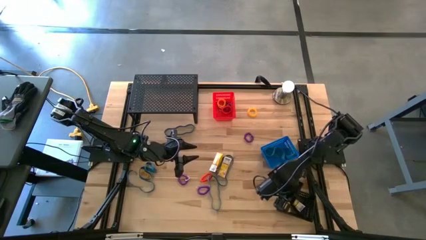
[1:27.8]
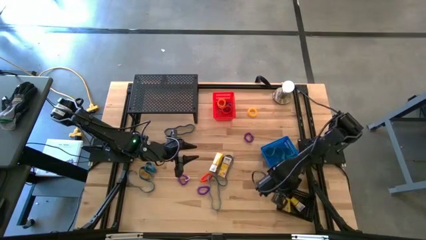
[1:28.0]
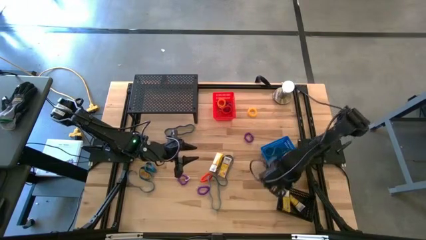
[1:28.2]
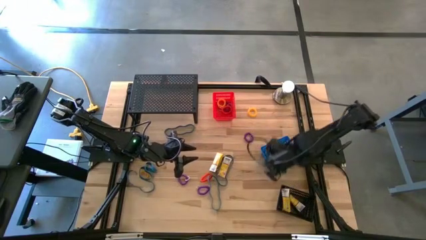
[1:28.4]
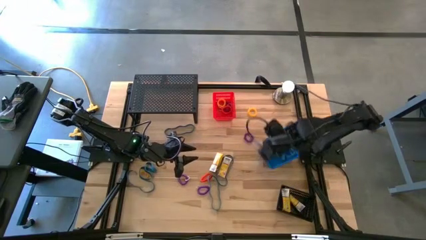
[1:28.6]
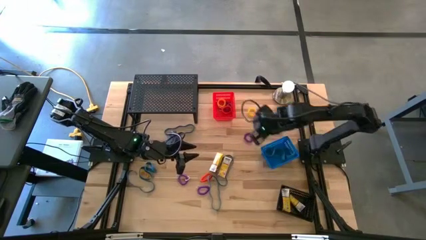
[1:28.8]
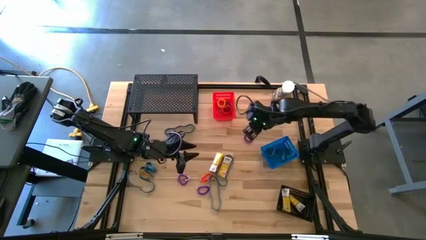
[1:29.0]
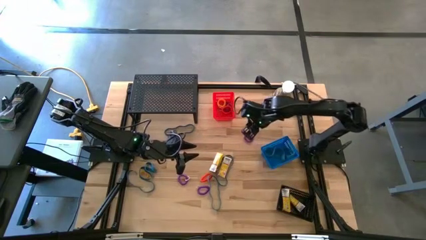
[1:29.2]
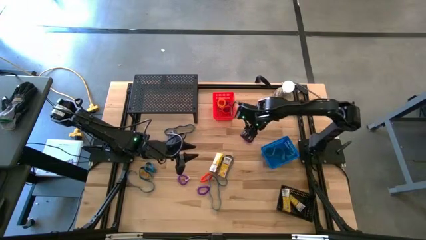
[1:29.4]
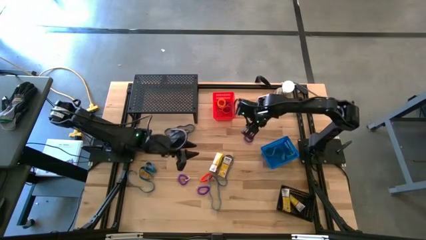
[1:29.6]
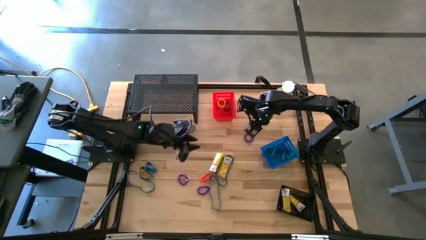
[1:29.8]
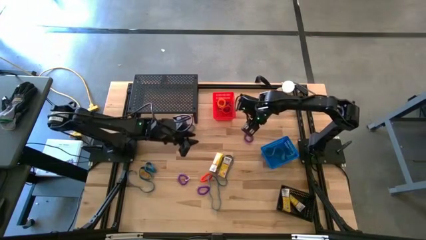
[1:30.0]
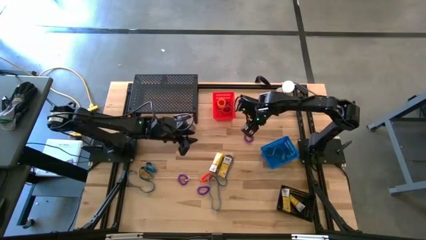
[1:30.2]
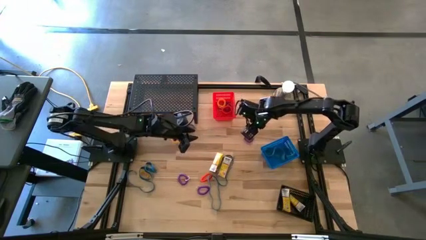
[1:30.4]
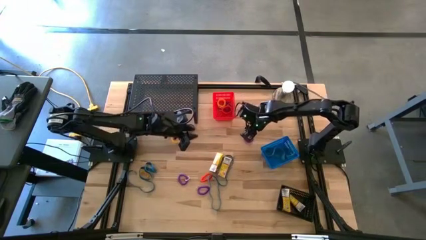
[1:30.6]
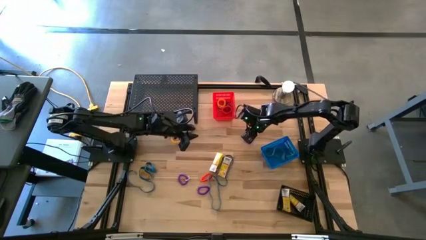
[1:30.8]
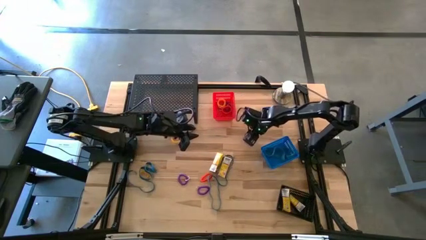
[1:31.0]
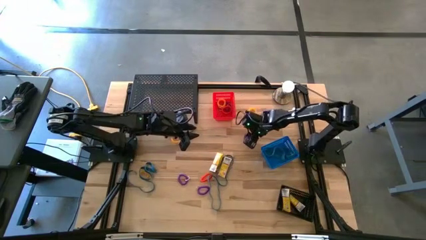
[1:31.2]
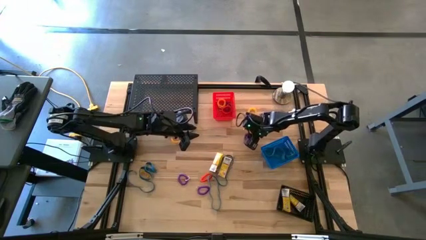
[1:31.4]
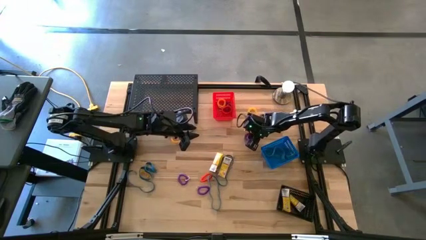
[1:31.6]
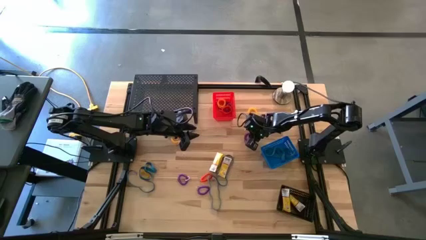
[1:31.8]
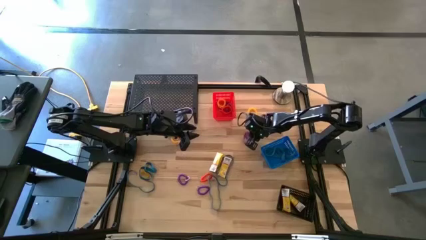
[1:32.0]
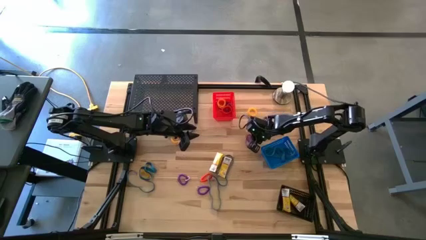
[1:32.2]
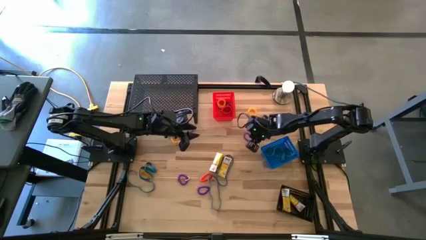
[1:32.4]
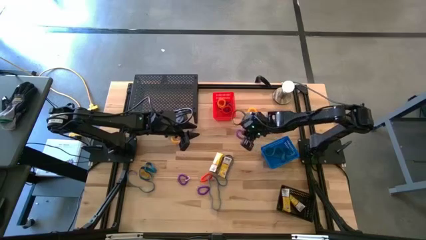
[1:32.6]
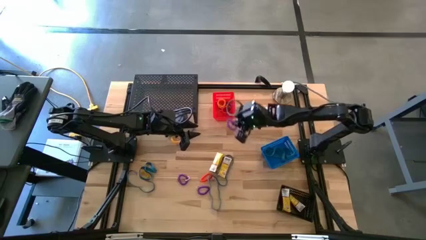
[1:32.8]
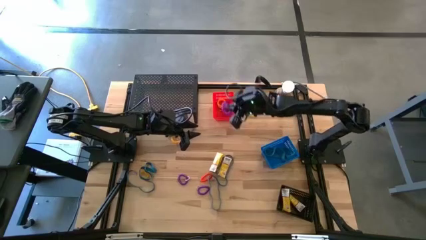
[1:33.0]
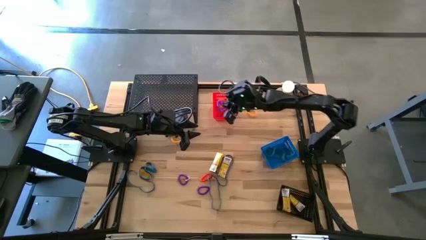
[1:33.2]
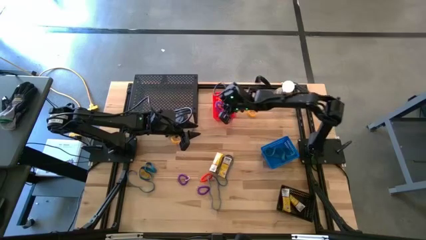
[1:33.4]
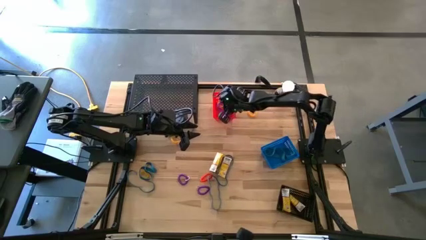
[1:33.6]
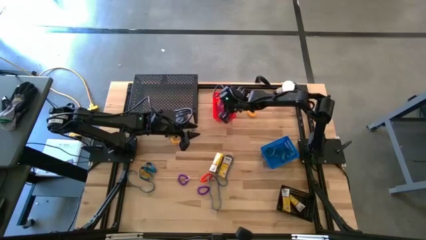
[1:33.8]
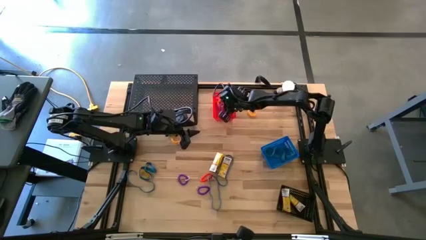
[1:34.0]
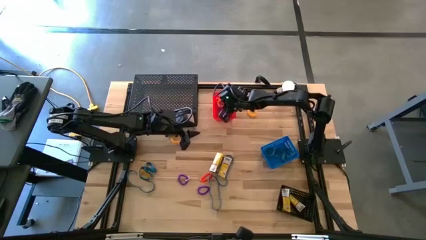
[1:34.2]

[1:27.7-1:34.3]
Task: Pick & Place Office Desk Supplies
Put the violet spring keychain into the red bin

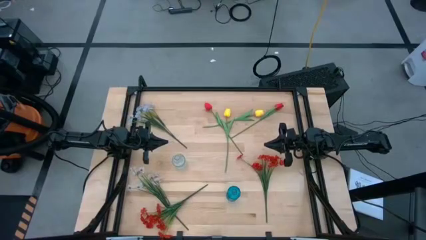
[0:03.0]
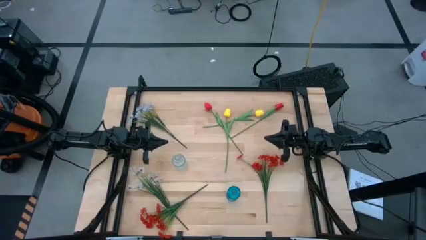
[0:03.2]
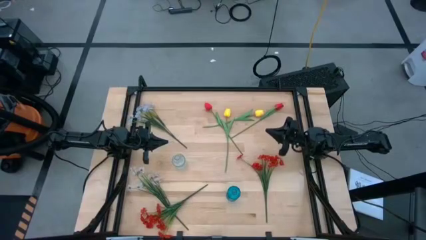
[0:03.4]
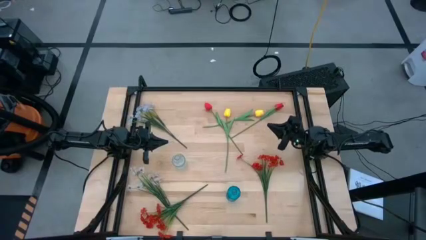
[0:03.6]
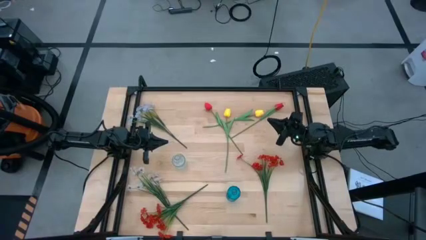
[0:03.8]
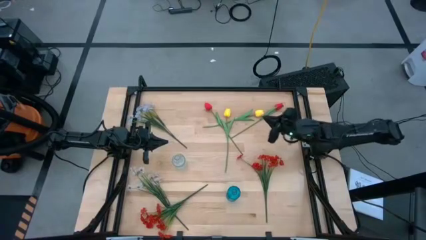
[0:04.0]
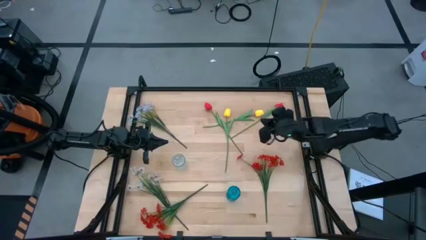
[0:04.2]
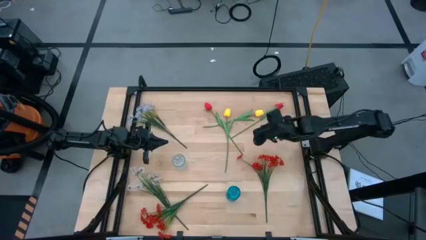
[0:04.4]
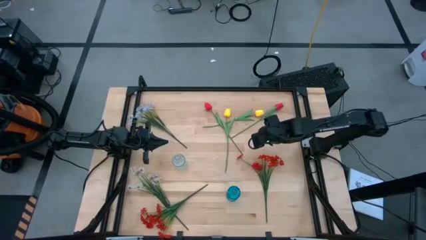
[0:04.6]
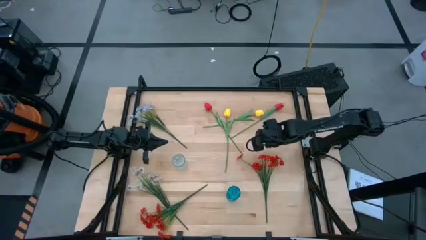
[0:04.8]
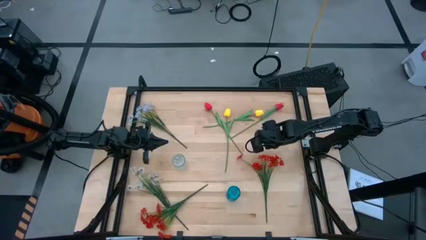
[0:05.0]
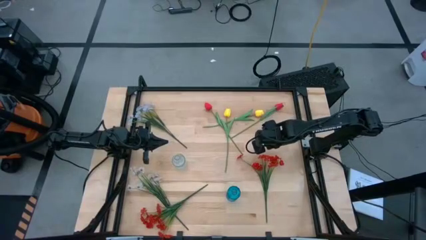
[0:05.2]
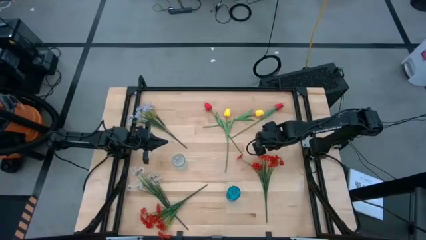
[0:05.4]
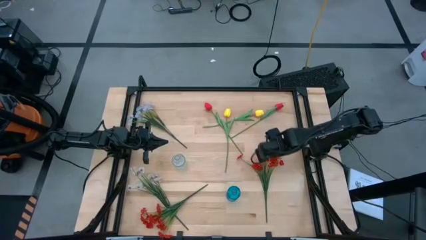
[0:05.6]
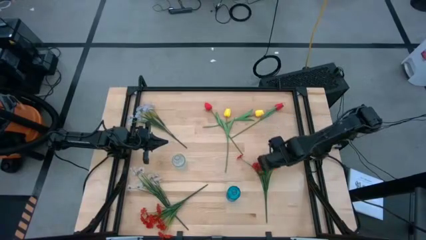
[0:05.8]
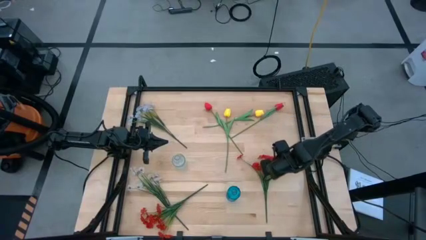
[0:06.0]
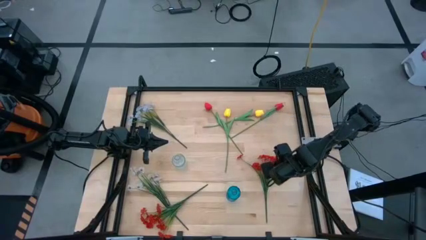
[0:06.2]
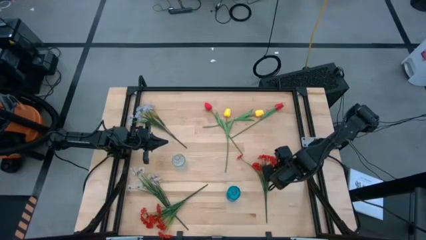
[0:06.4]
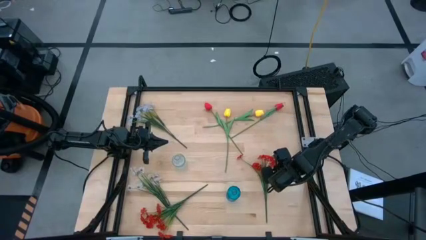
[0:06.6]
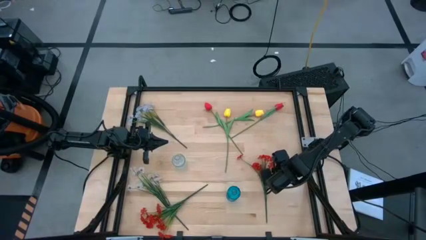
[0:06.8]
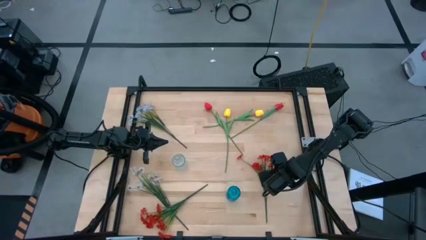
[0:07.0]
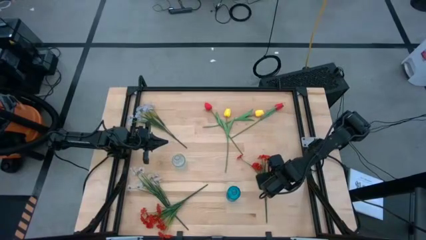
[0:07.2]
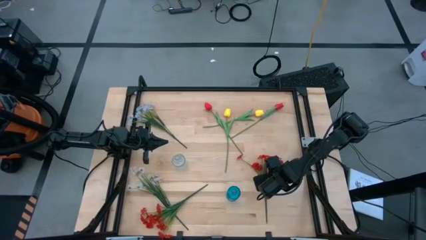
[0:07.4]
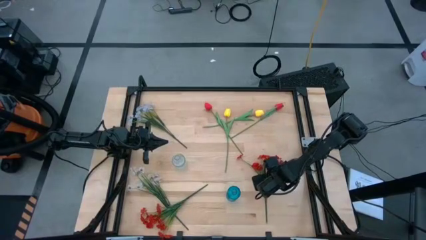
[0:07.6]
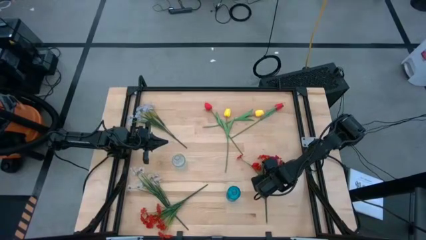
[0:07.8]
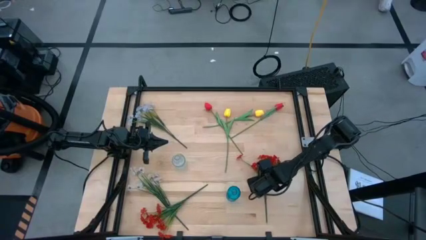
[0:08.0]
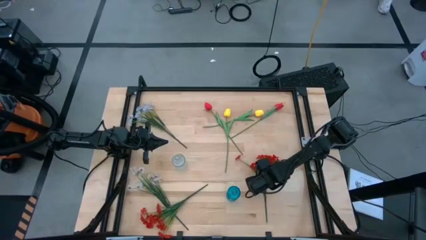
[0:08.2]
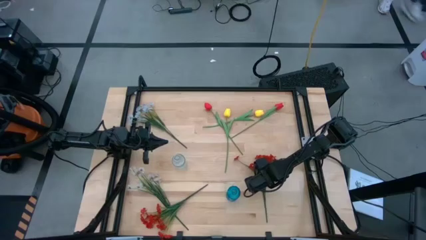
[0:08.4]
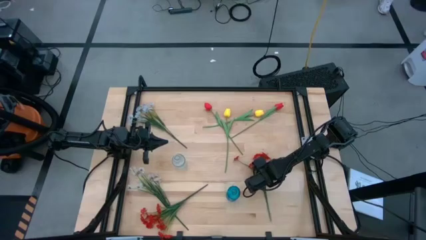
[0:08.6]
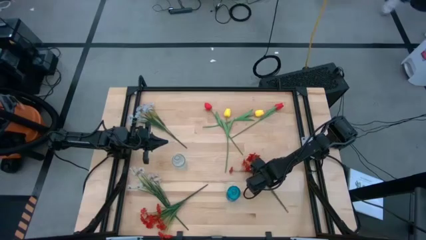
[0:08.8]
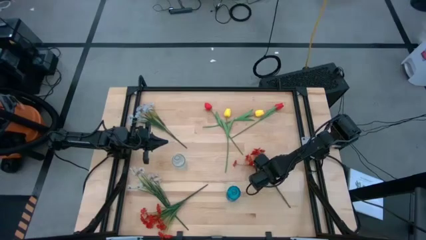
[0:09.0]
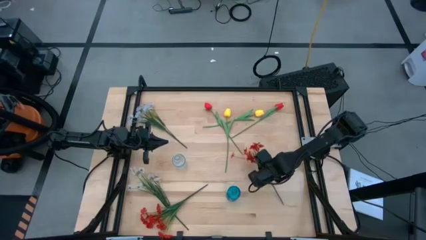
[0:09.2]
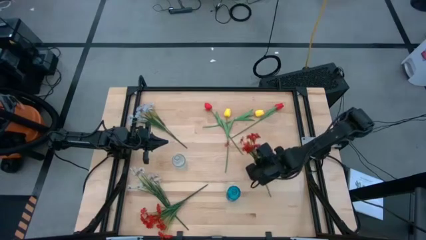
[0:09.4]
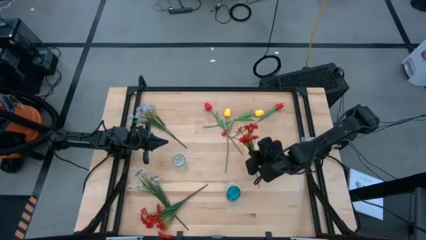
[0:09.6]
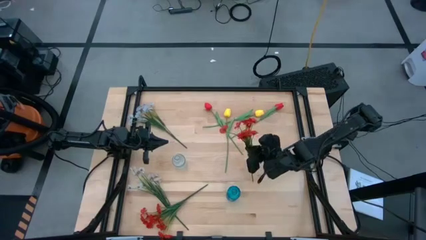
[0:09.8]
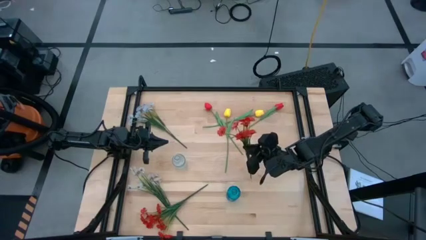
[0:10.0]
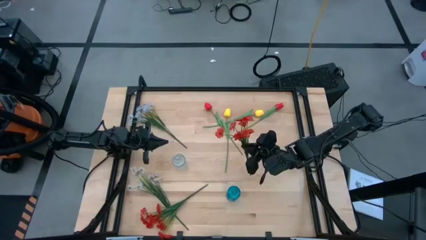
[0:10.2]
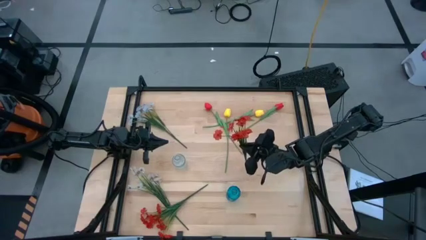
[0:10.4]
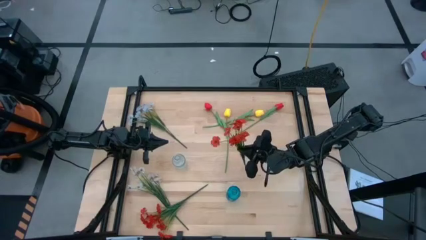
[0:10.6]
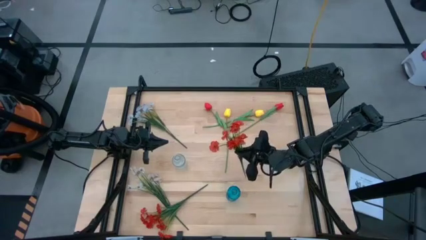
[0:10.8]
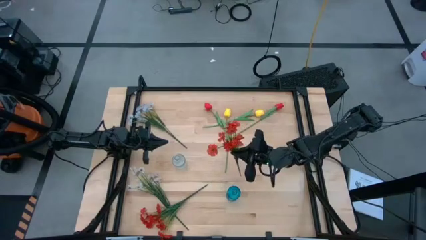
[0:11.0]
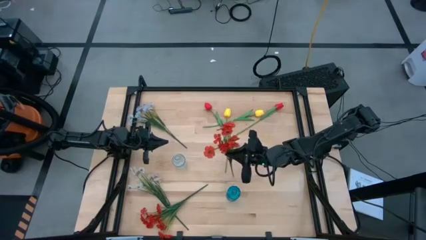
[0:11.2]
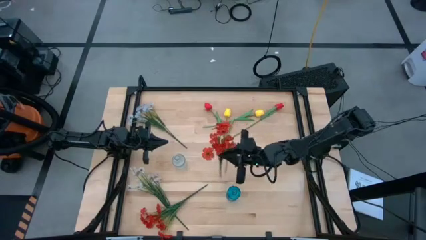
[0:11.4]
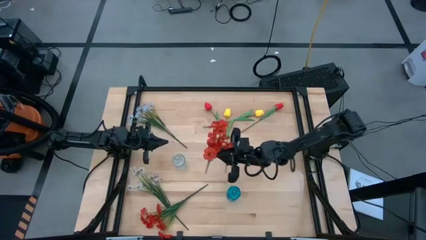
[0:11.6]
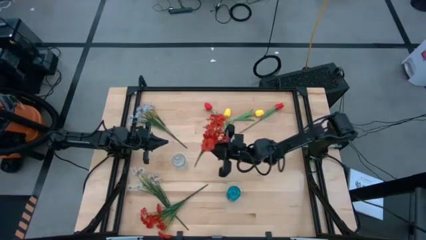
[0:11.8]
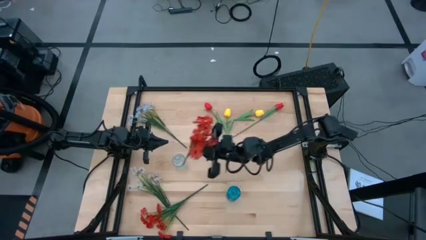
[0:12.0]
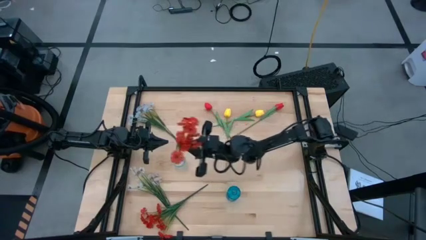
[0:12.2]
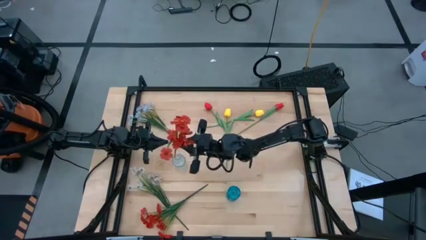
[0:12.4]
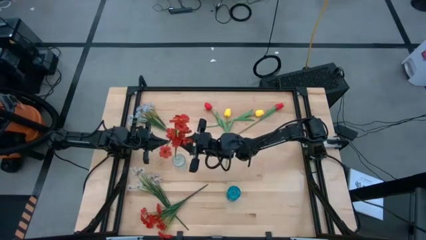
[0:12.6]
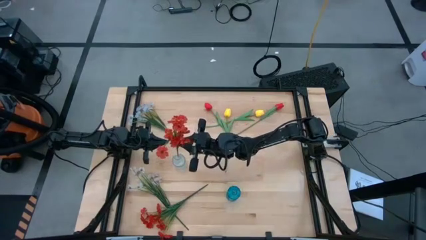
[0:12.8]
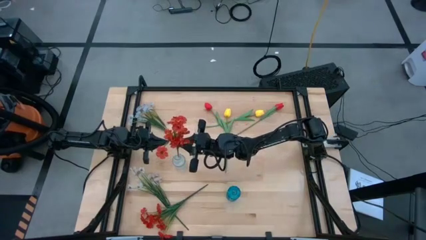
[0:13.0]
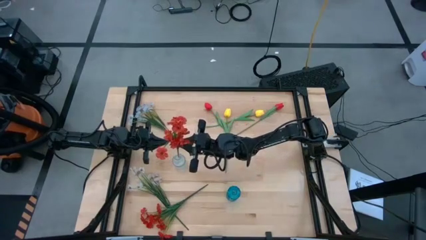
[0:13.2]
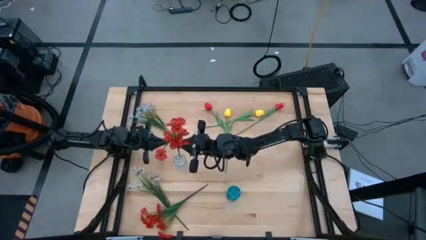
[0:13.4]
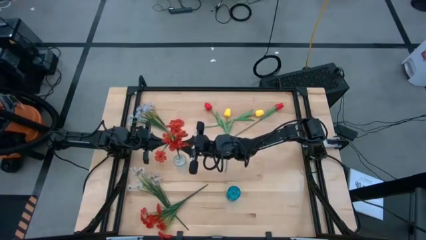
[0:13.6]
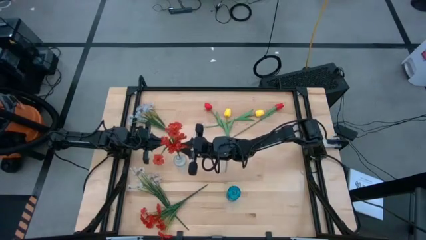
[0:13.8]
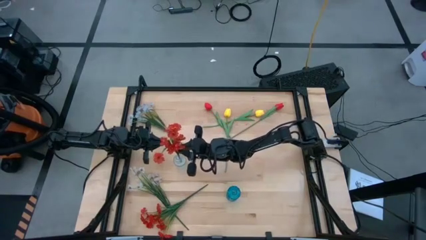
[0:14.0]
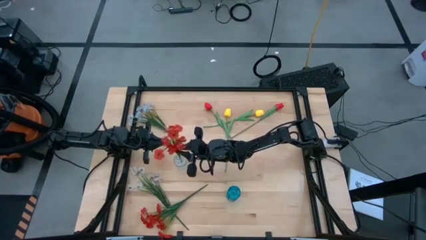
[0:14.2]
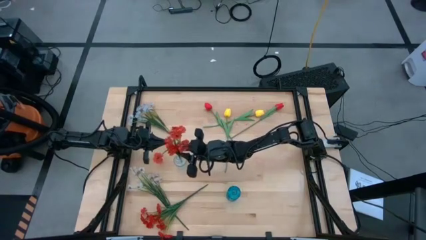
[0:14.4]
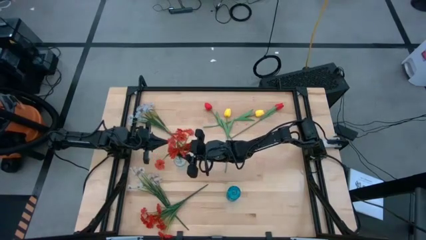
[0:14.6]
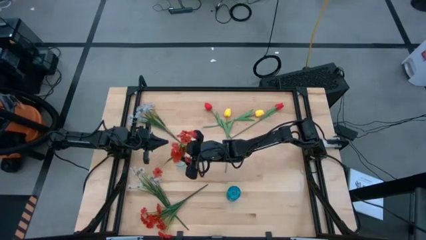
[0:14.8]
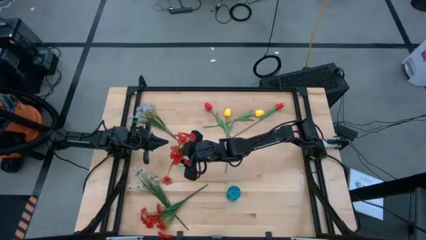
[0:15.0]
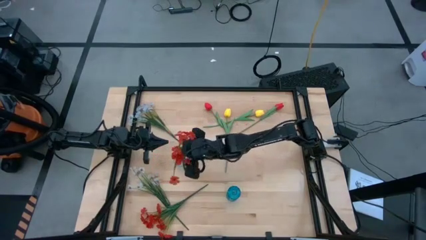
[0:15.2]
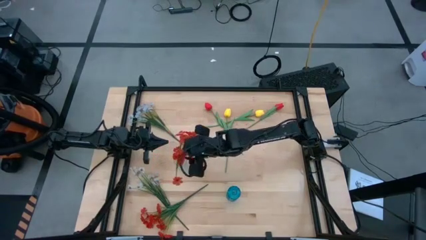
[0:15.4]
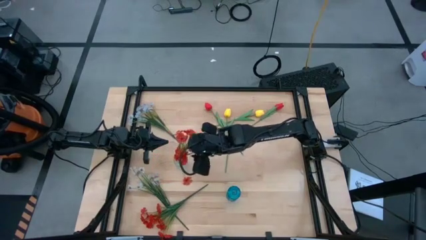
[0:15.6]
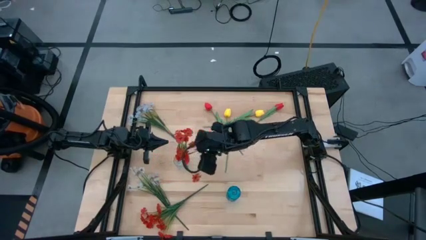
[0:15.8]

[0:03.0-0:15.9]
Task: Sort flowers into vase by color
Put the right orange flowers into the transparent vase
